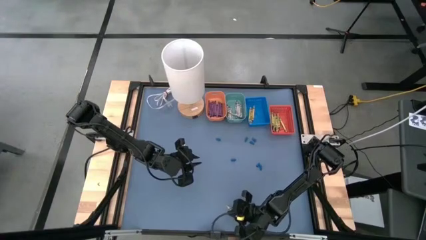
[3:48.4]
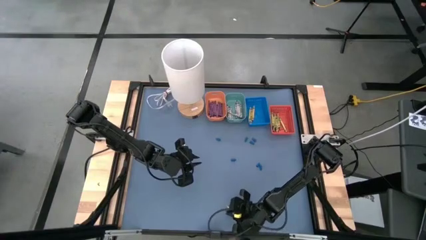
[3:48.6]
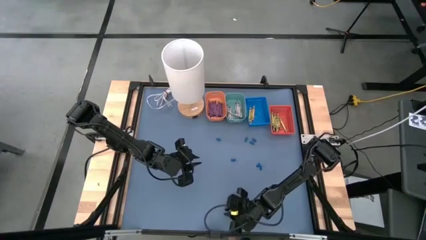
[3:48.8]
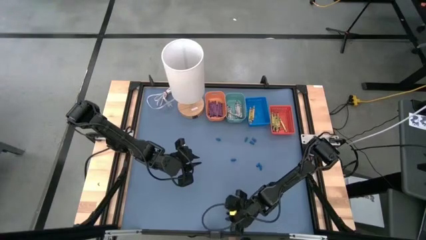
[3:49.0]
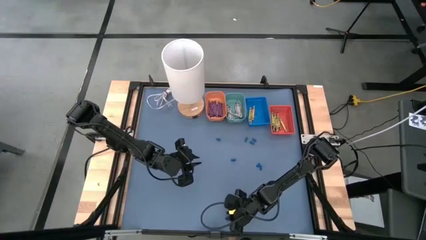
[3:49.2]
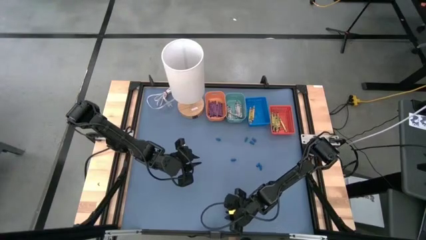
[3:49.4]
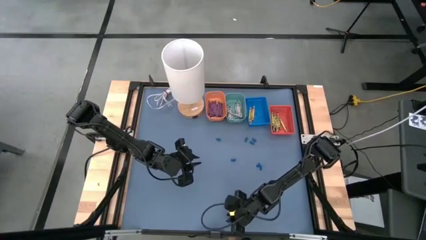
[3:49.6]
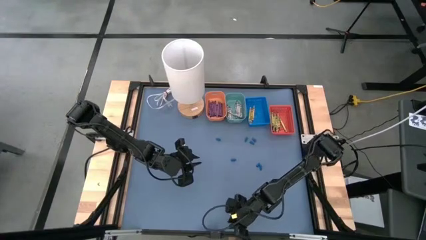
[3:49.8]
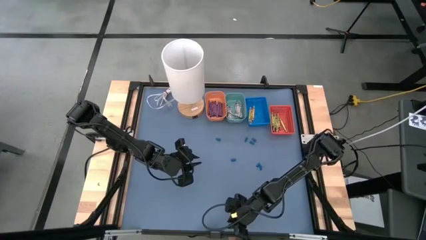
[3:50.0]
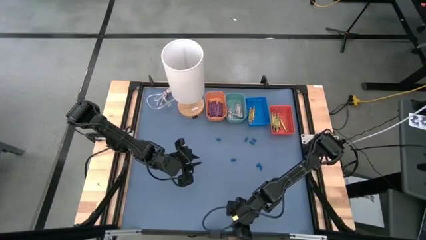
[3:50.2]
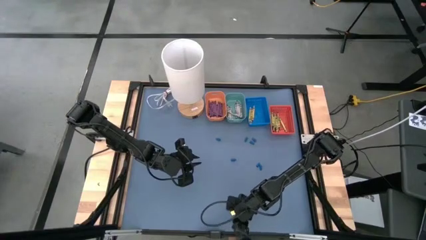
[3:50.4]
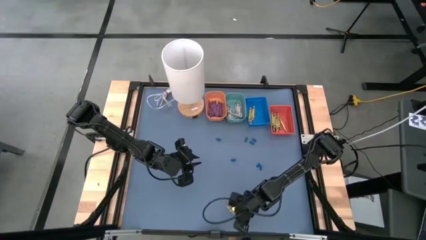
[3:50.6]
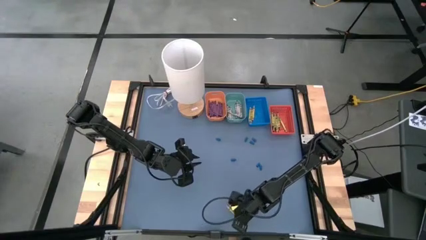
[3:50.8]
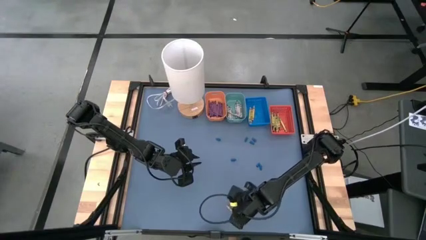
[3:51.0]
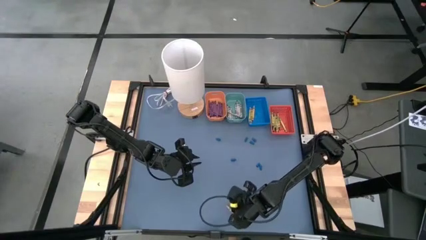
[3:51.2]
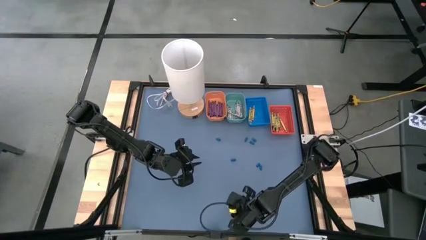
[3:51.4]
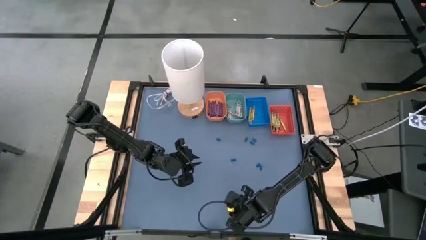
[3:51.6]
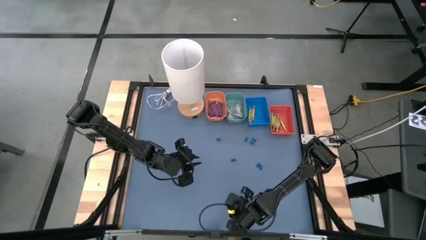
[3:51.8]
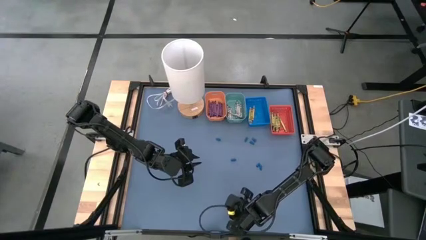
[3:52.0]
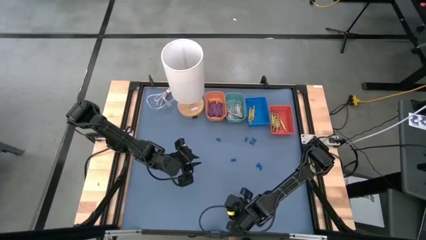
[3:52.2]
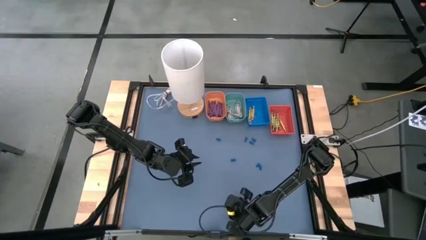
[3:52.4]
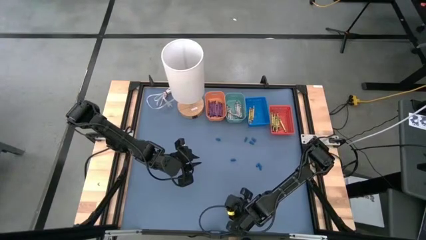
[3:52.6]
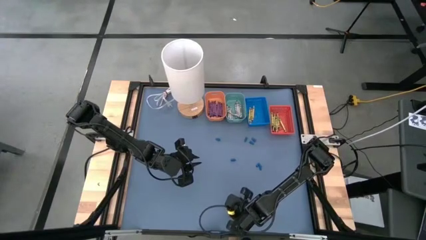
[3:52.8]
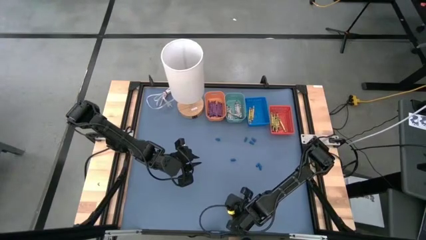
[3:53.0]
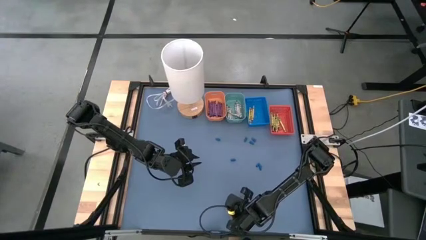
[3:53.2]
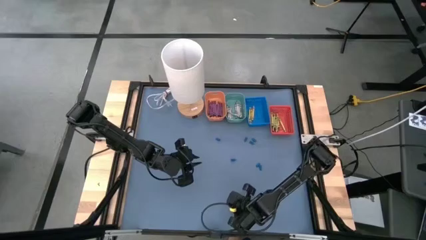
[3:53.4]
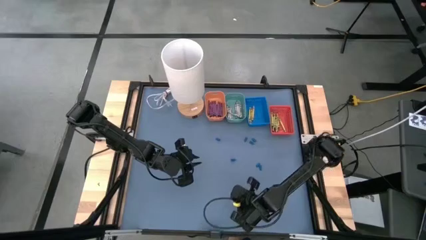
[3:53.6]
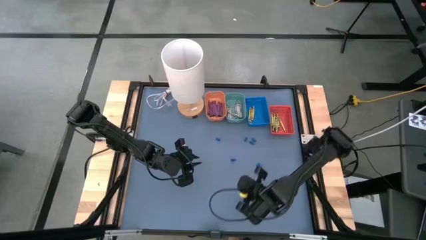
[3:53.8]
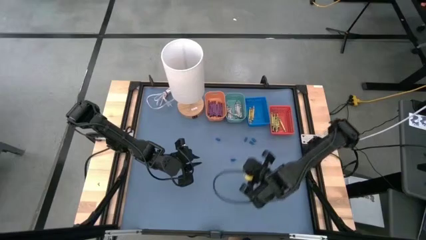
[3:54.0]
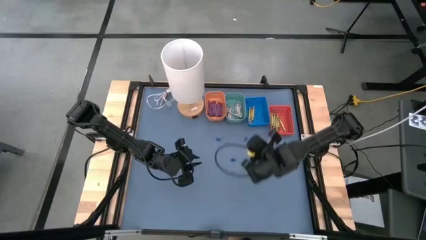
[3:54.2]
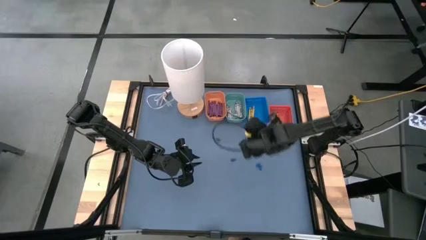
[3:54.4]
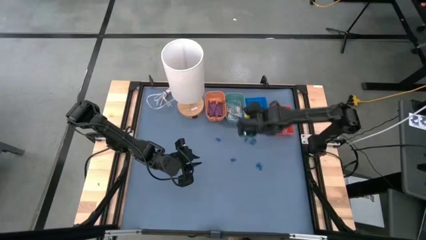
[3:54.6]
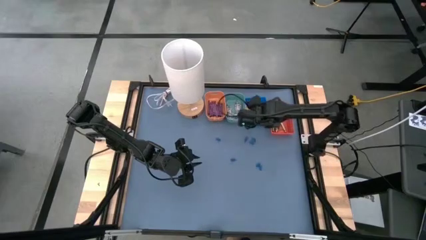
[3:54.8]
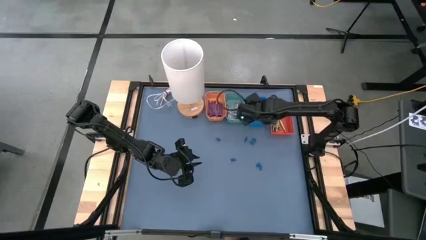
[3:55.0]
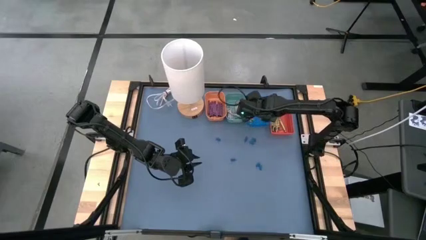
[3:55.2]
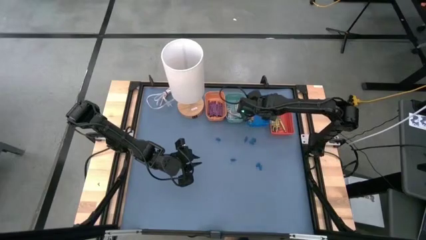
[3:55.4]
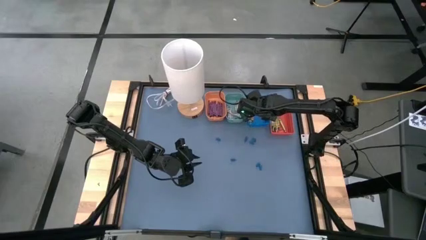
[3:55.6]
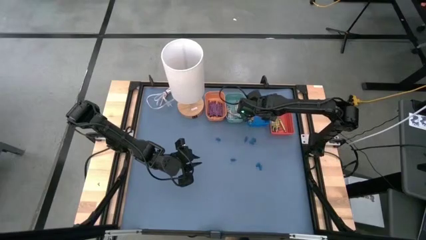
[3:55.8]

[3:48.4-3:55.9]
Task: Sort crayons
Put the yellow crayon into the blue bin

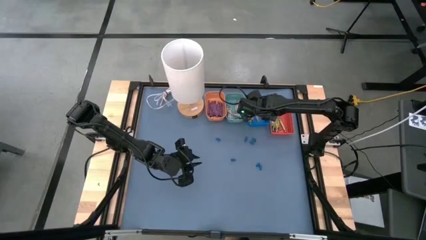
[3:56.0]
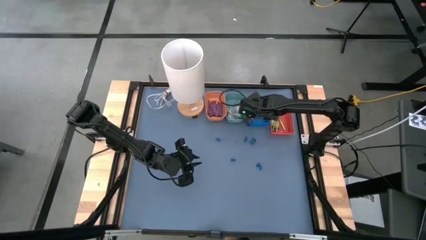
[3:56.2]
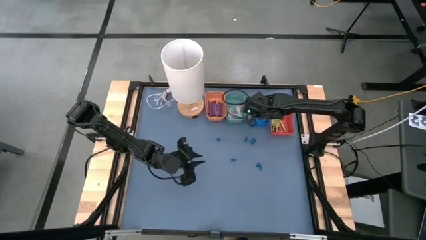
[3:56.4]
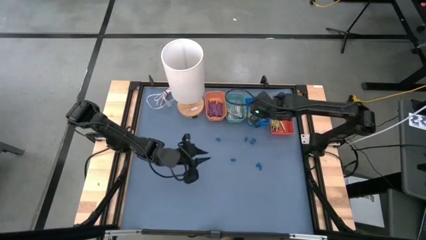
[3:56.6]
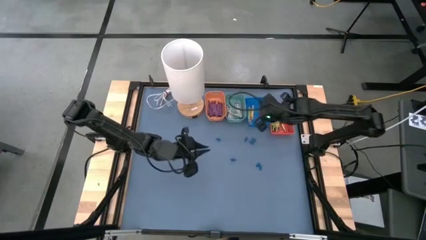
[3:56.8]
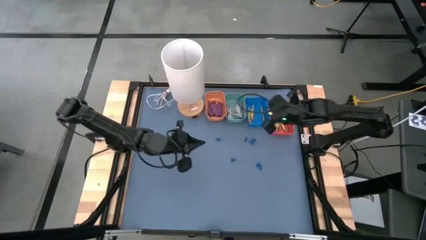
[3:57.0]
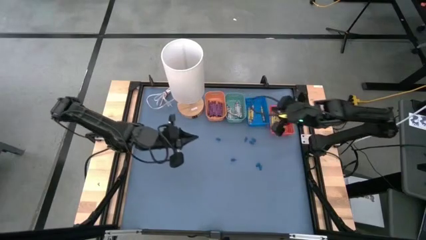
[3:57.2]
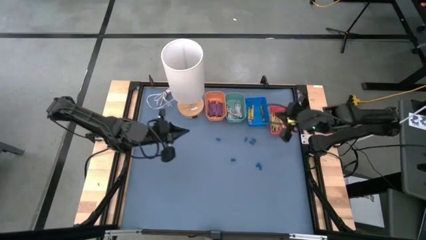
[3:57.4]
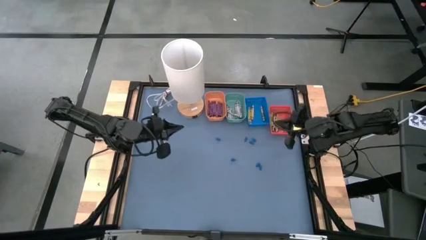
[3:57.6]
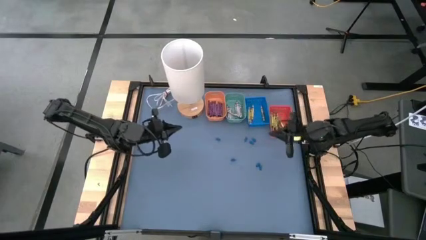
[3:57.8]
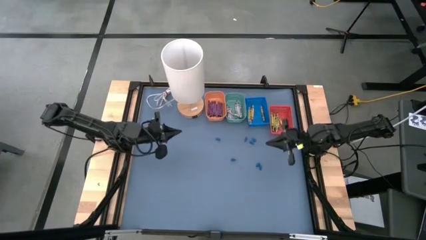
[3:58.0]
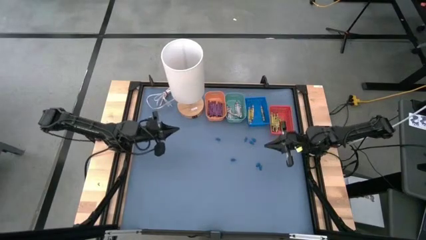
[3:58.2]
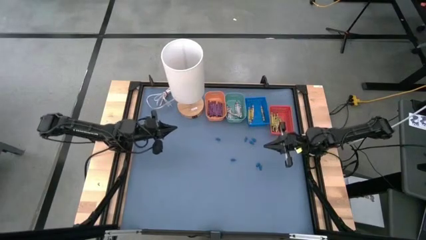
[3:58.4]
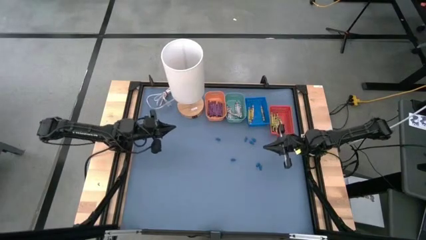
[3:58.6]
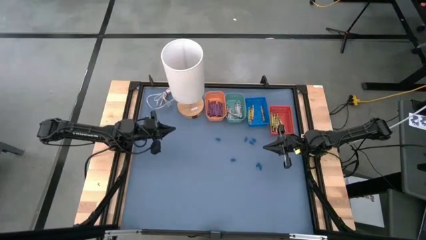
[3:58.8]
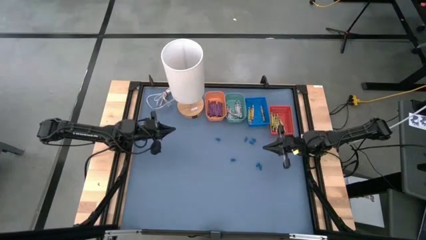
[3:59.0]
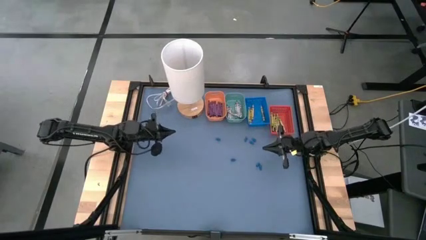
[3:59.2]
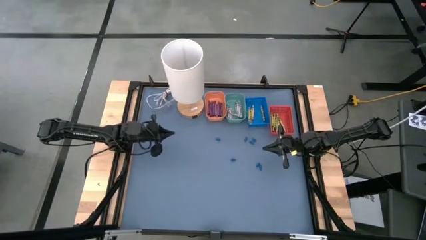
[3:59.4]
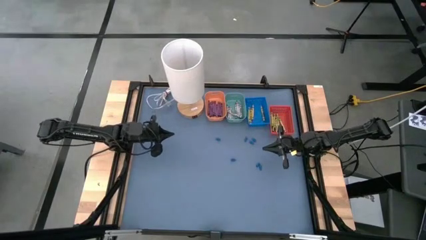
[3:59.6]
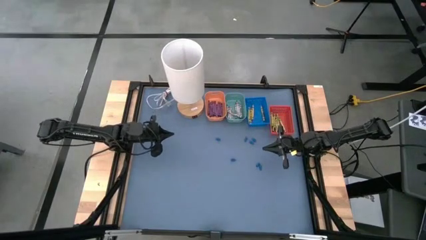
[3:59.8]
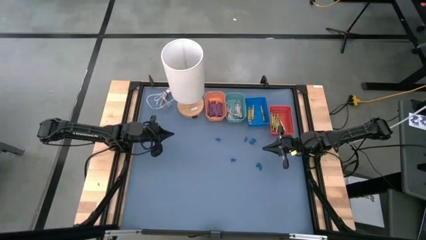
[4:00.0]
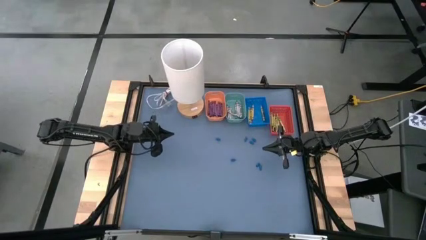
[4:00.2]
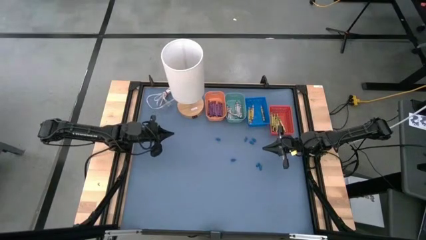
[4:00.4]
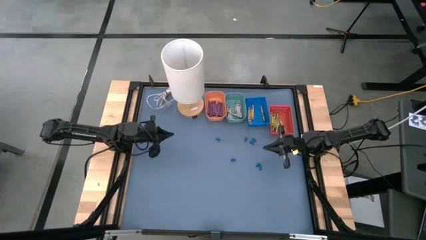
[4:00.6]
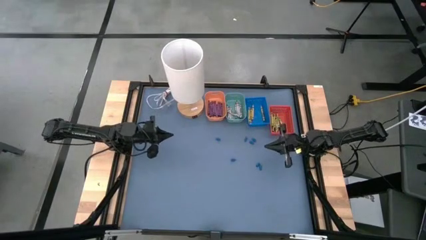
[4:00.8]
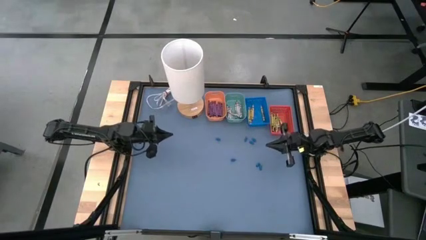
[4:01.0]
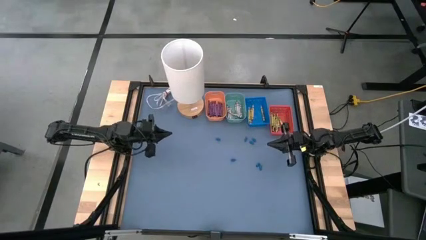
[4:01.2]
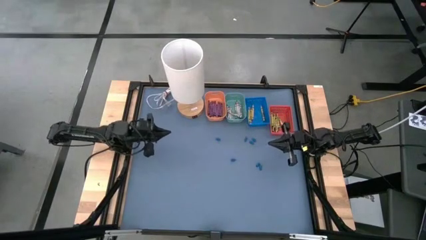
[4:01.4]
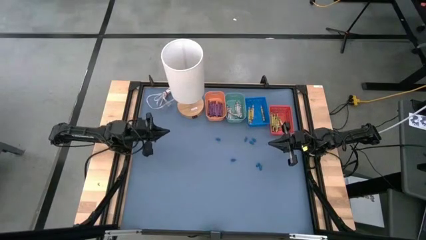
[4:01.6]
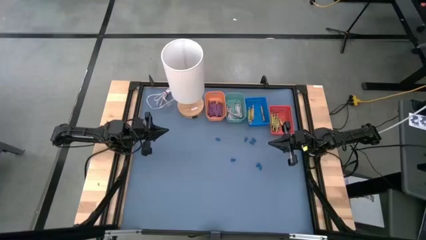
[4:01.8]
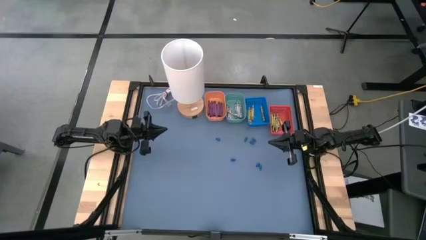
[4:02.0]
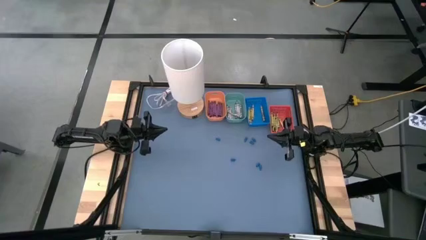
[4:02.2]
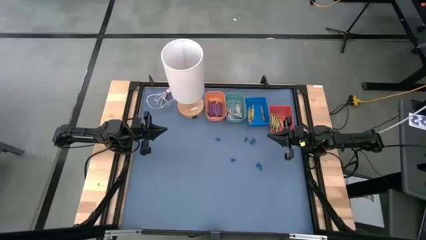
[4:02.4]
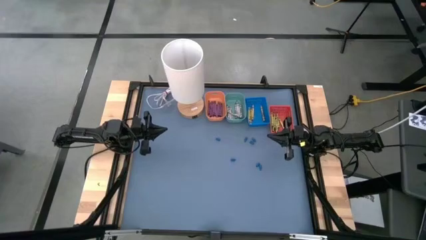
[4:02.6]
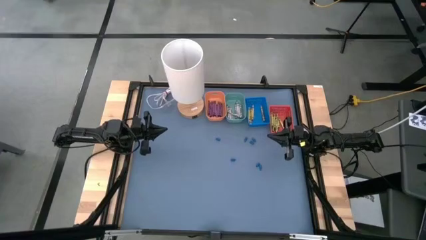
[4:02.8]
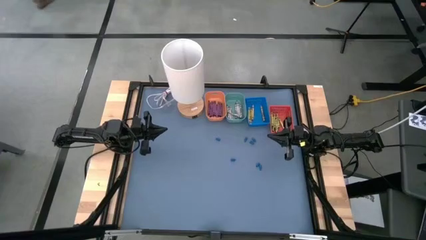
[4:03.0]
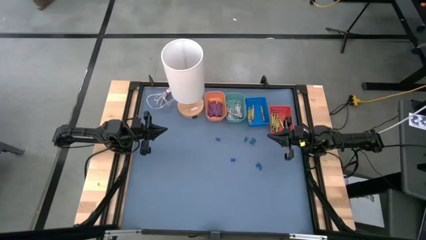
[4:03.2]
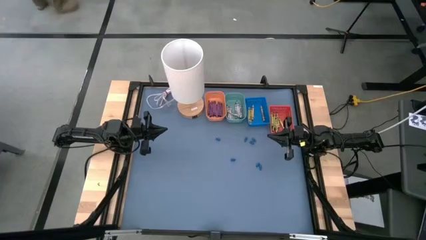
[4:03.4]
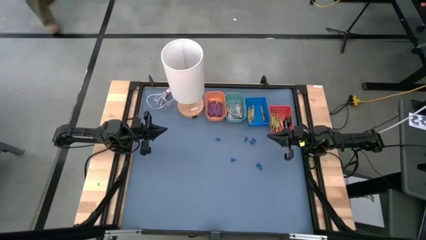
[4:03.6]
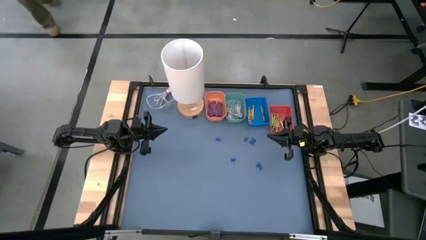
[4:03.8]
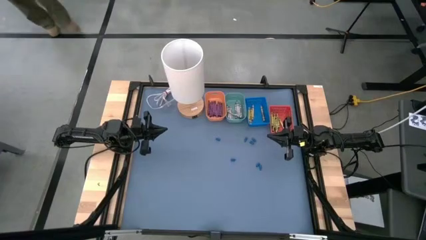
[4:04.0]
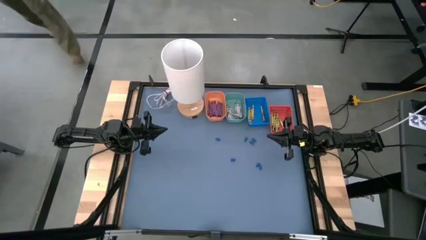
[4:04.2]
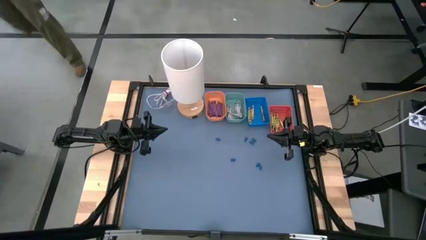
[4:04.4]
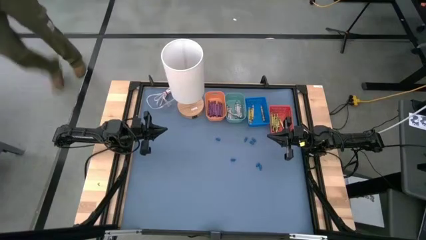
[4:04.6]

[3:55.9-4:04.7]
Return to Home Position
